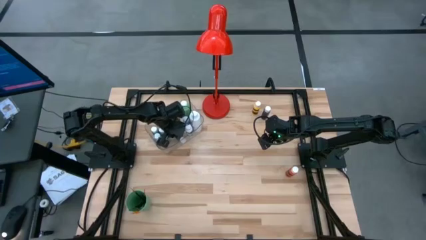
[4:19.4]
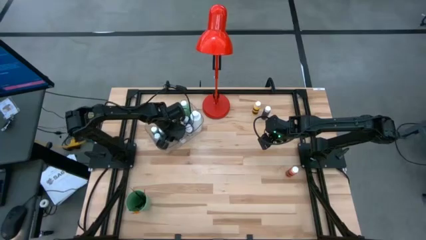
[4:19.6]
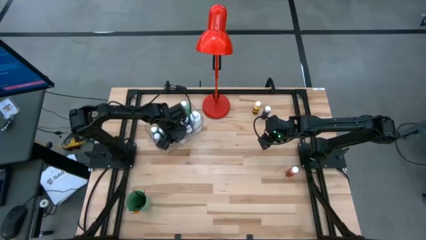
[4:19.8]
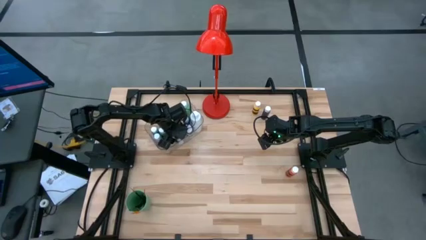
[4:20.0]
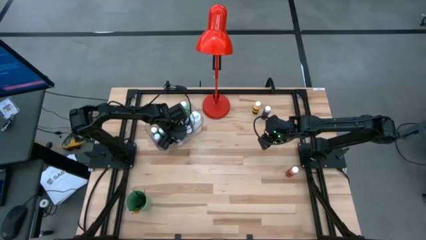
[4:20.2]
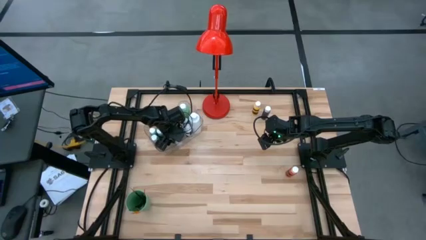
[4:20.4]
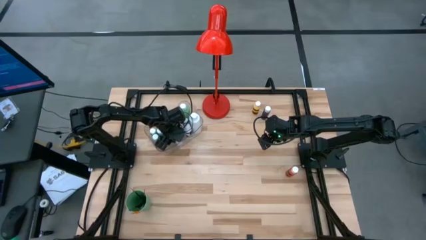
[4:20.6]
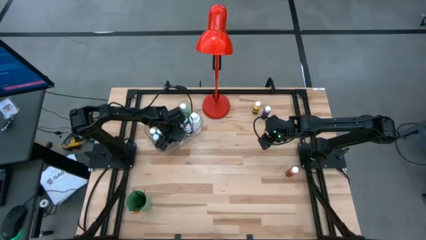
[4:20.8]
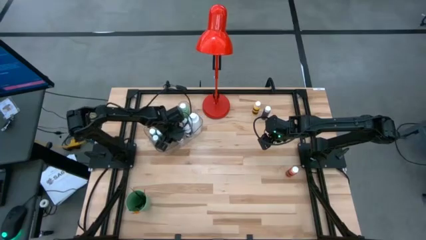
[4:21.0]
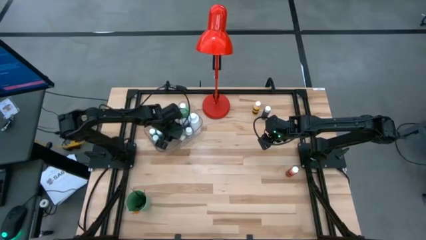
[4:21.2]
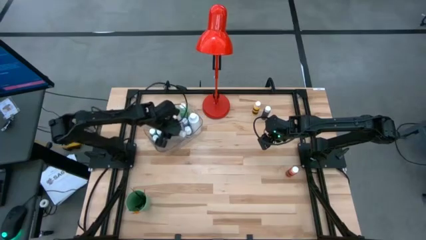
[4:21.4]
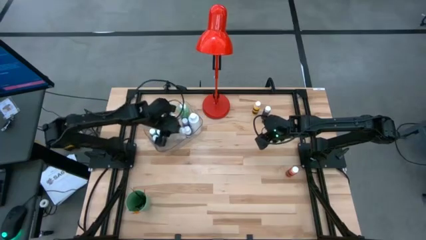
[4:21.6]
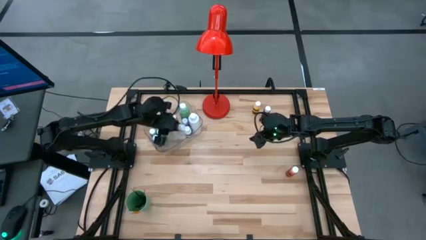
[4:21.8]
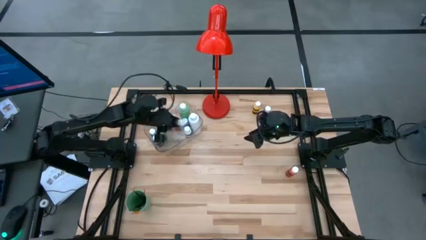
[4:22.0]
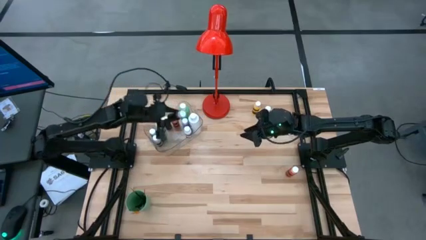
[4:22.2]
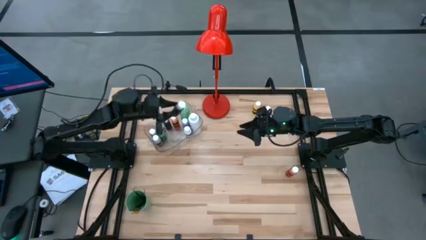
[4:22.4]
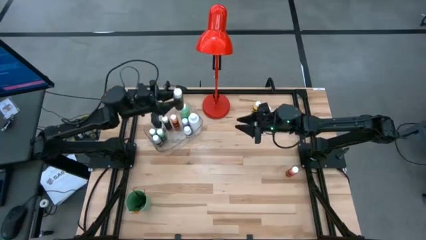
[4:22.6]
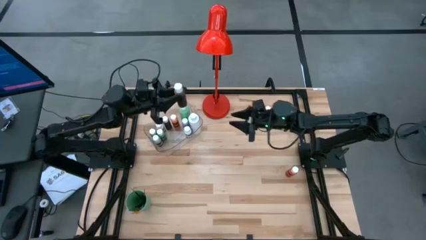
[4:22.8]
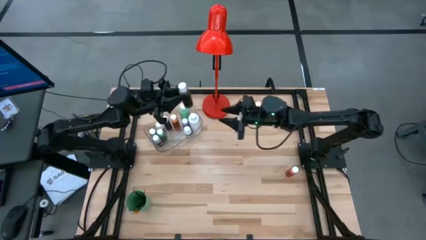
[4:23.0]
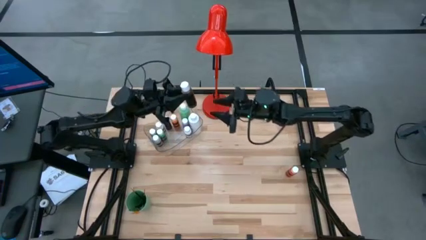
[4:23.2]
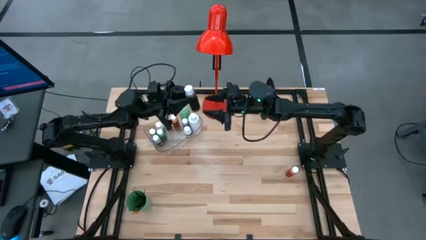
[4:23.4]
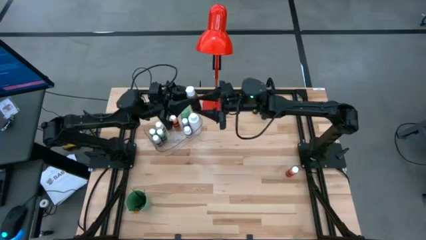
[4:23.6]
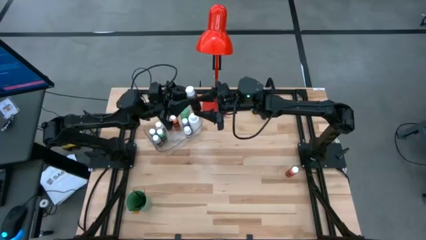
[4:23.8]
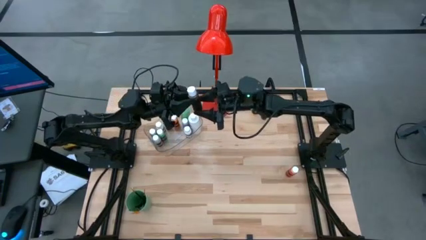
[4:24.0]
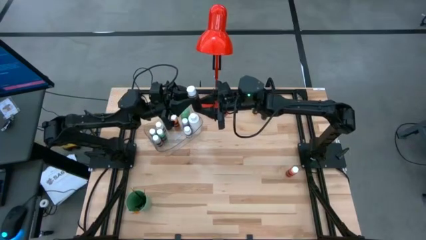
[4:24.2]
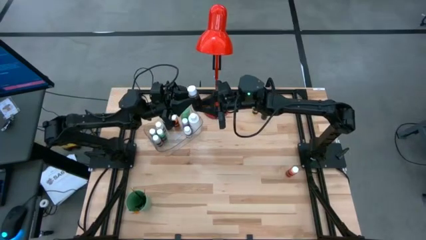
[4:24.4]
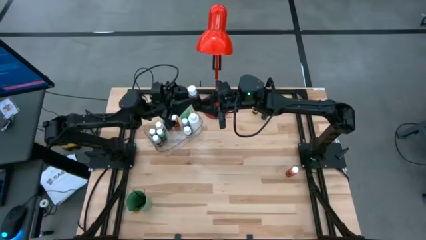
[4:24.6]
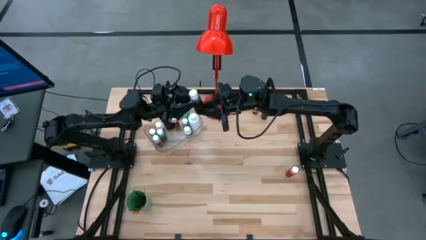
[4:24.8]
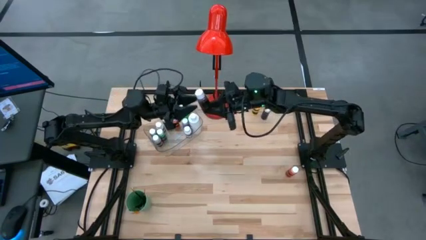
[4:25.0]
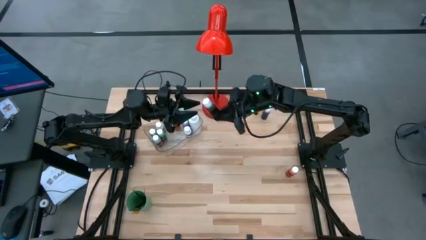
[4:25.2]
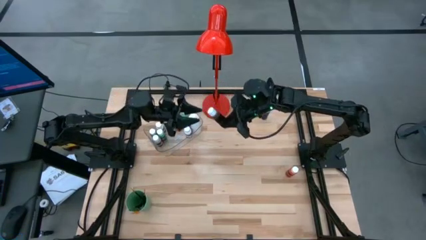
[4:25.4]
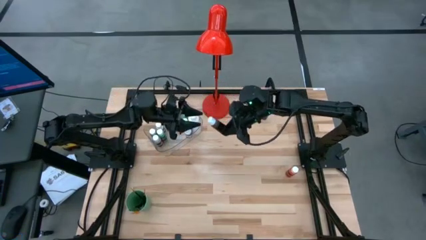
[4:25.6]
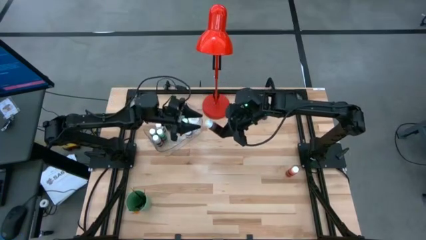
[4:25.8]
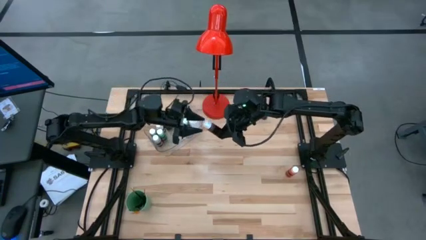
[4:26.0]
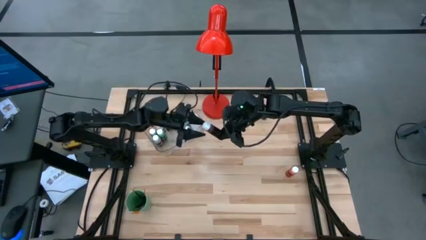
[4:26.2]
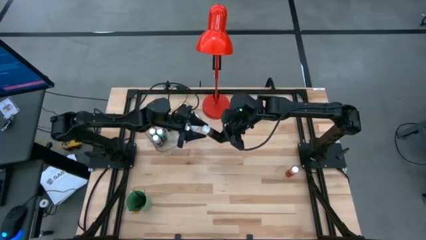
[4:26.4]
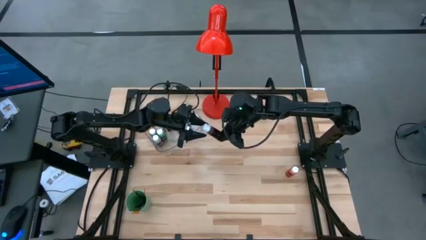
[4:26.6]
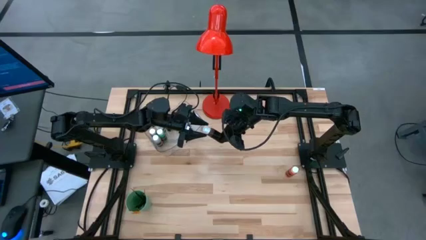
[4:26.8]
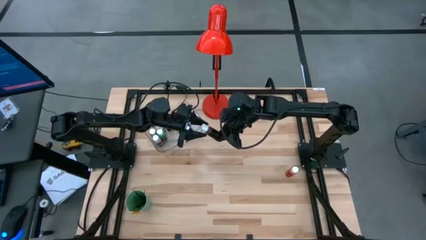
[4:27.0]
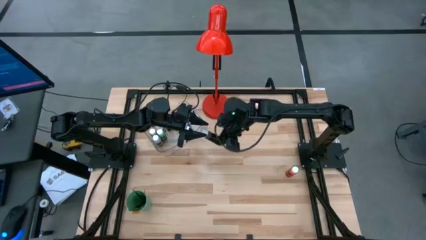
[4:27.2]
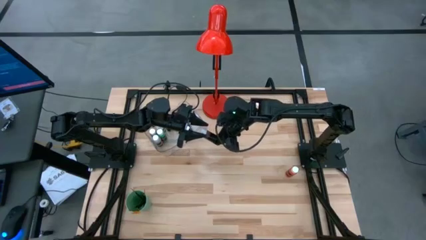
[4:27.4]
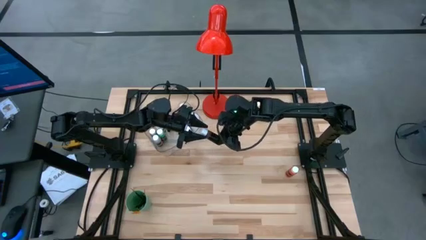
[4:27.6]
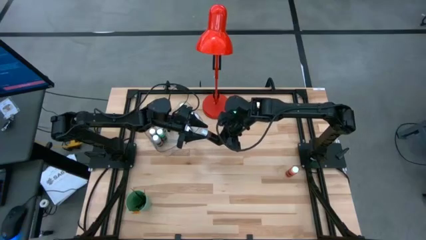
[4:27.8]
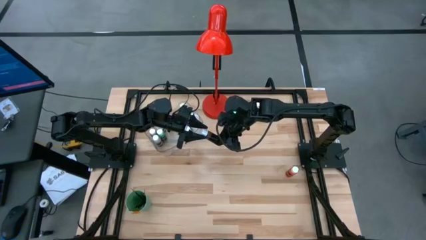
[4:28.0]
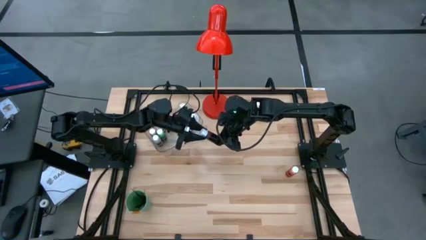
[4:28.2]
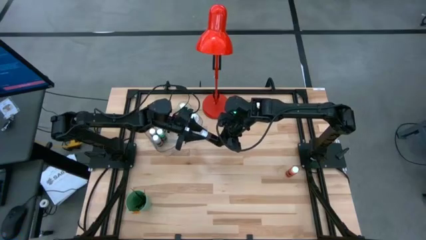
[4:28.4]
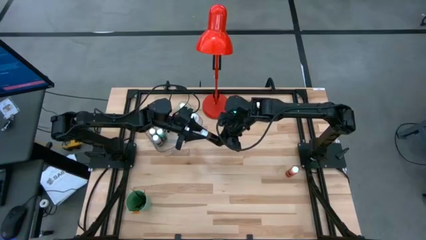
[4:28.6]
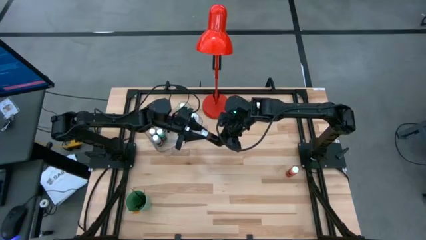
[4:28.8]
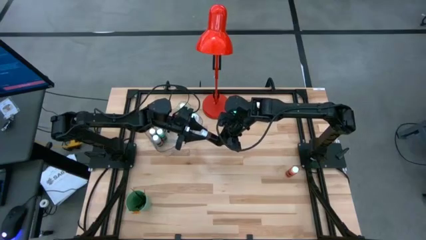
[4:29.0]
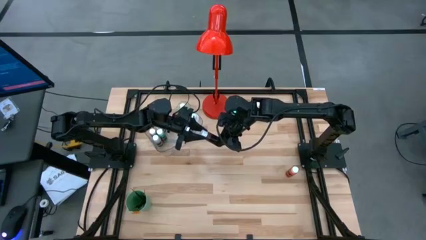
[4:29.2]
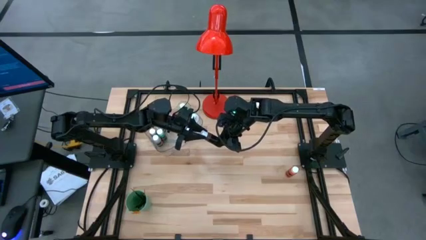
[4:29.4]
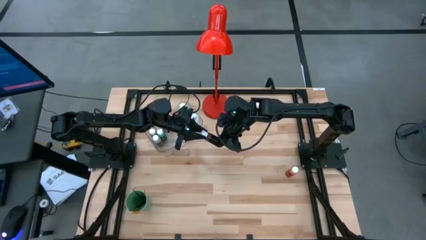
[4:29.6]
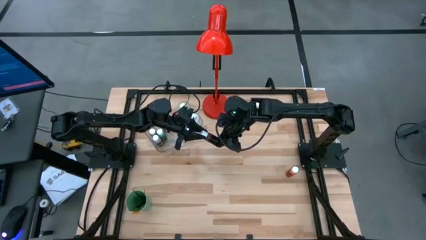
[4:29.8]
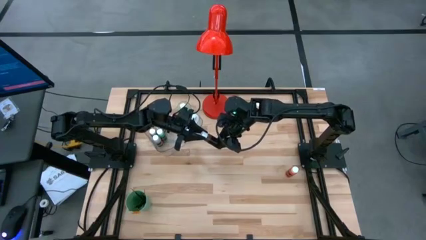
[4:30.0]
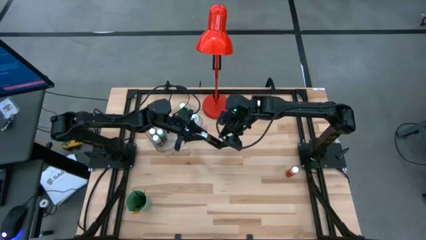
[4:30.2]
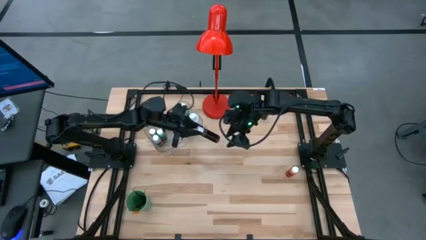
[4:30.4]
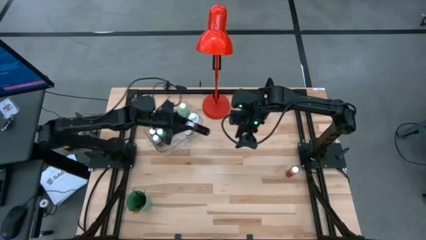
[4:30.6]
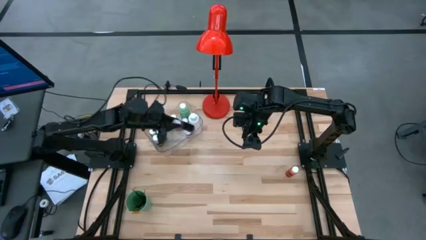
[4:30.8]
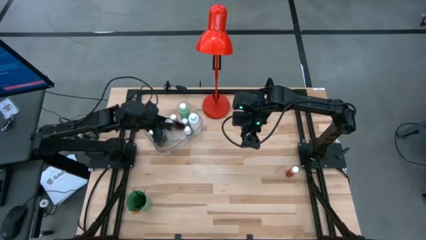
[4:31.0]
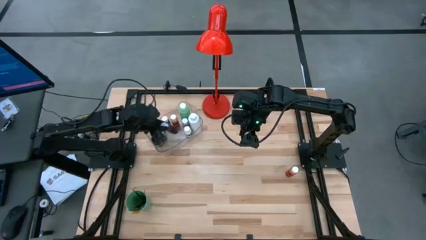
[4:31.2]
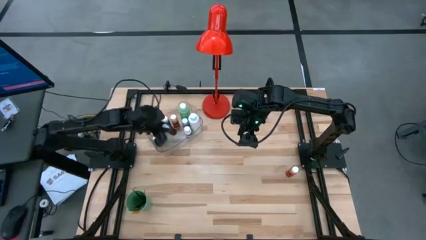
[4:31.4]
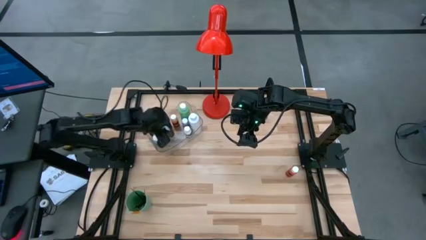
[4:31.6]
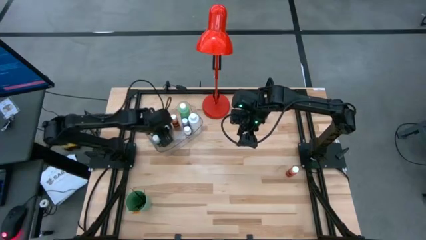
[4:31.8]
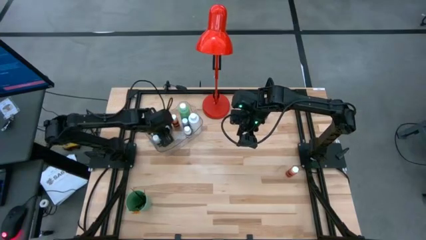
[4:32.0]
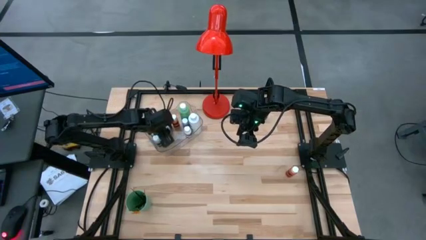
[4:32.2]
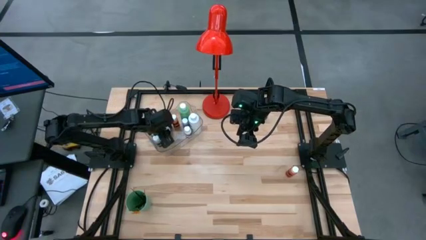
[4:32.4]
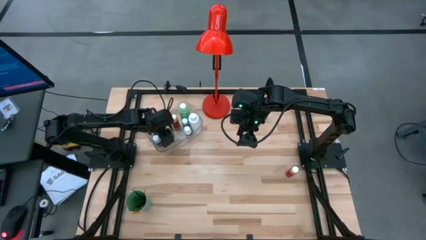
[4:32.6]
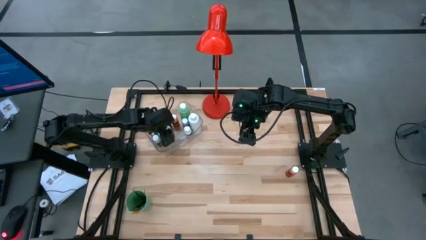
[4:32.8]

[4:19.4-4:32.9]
Task: Pick & Place Paint Supplies
Put the brown paint bottle into the transparent bin
